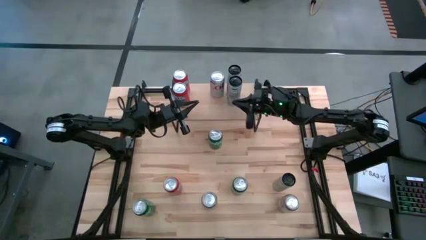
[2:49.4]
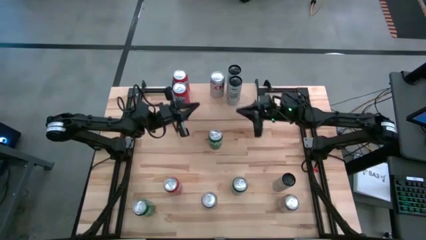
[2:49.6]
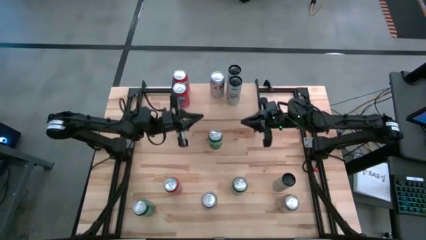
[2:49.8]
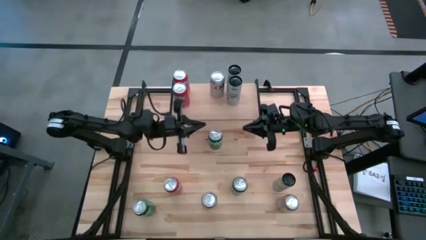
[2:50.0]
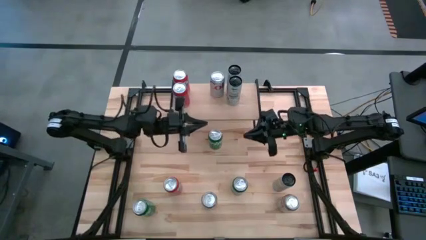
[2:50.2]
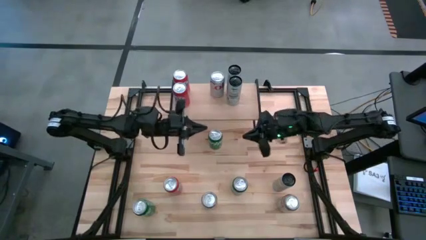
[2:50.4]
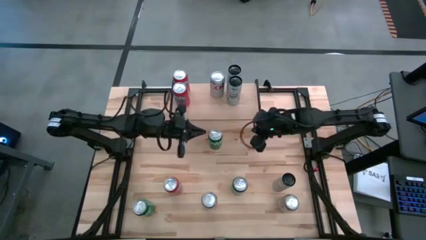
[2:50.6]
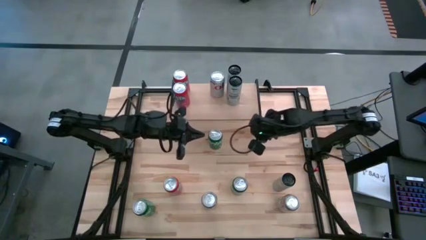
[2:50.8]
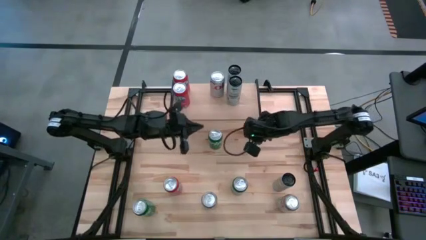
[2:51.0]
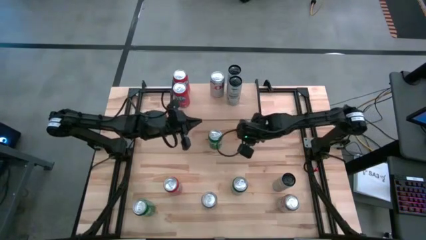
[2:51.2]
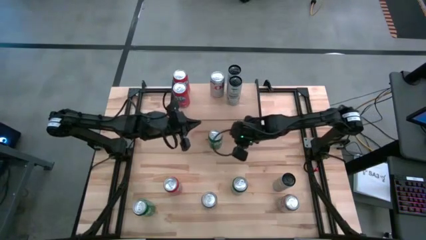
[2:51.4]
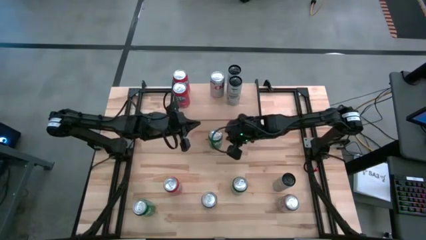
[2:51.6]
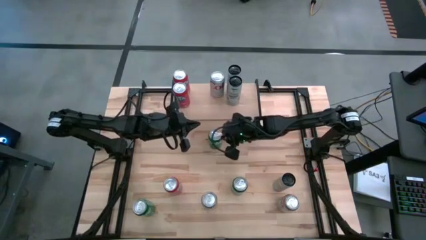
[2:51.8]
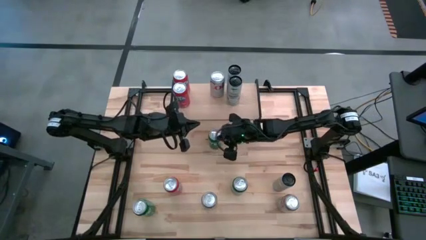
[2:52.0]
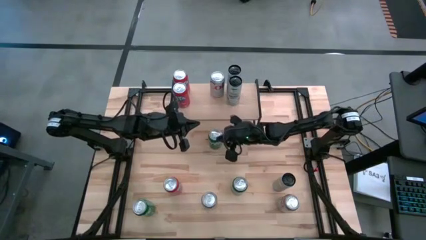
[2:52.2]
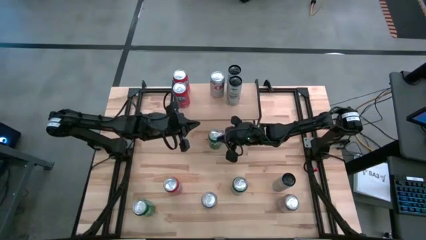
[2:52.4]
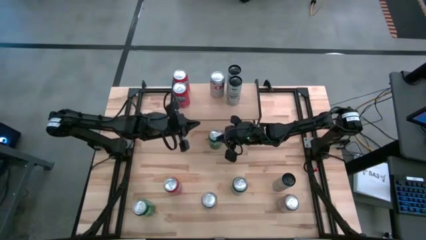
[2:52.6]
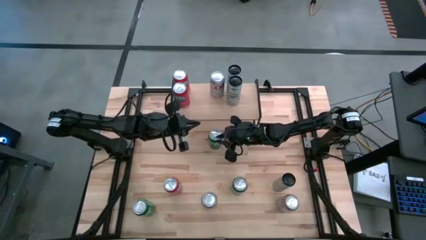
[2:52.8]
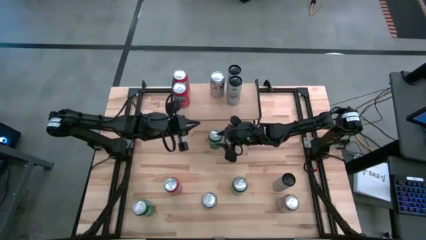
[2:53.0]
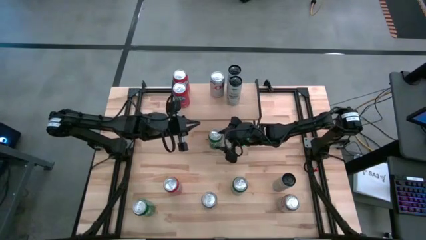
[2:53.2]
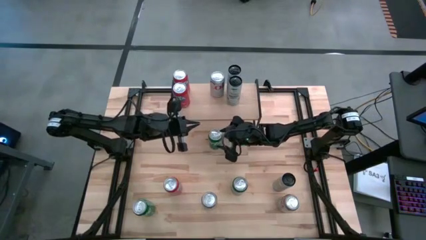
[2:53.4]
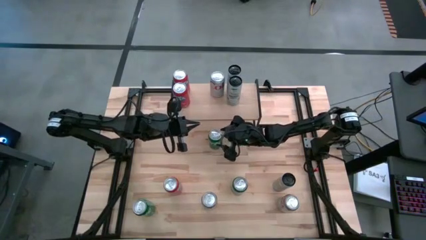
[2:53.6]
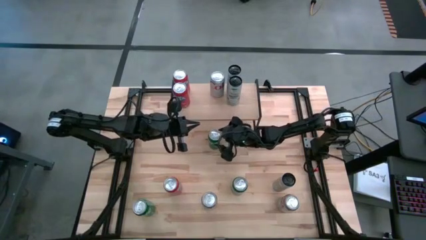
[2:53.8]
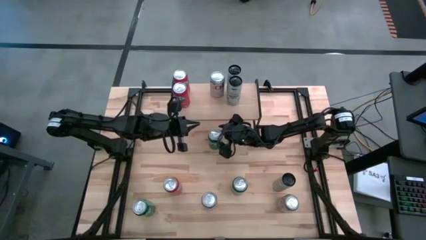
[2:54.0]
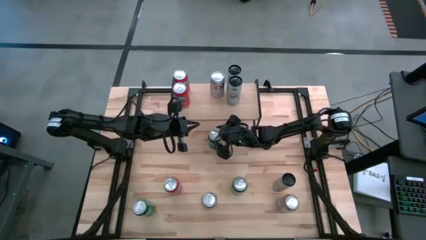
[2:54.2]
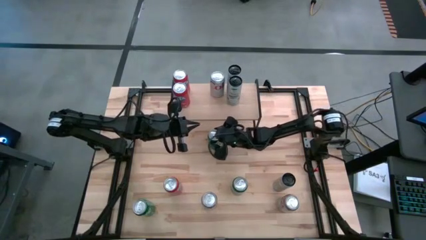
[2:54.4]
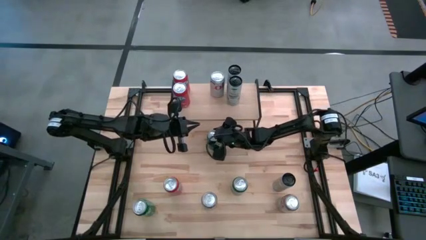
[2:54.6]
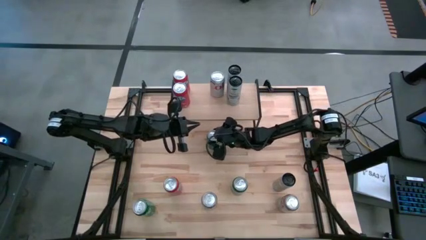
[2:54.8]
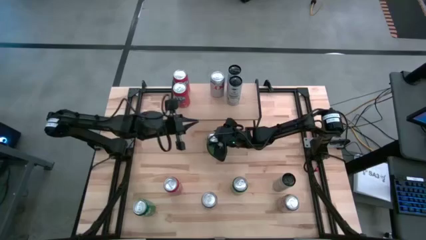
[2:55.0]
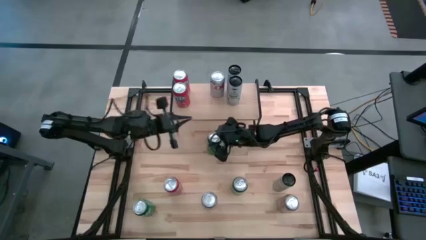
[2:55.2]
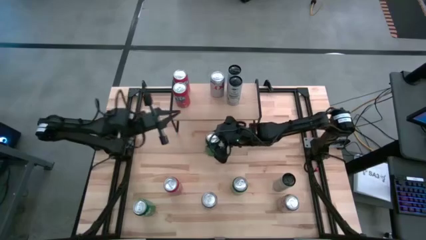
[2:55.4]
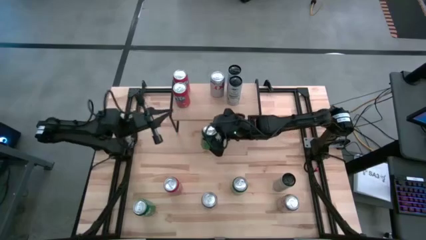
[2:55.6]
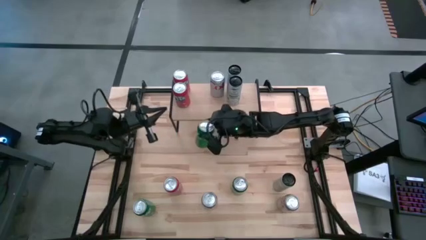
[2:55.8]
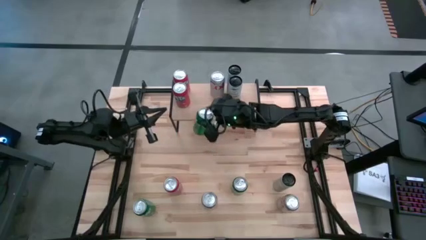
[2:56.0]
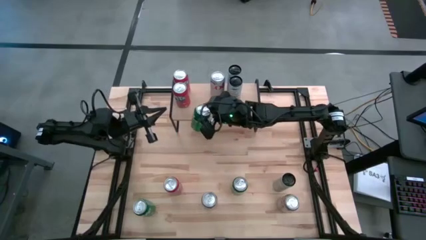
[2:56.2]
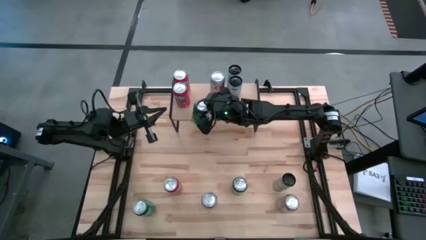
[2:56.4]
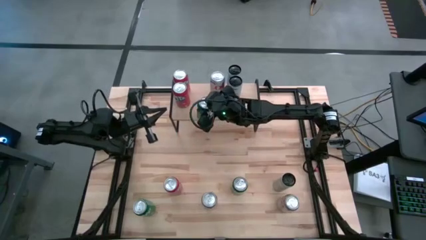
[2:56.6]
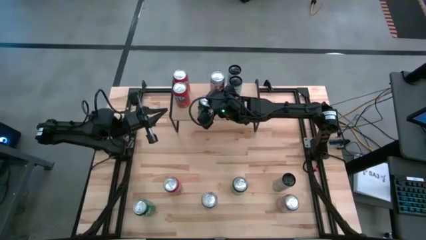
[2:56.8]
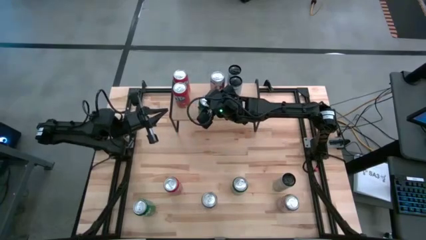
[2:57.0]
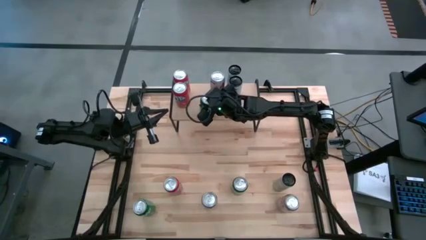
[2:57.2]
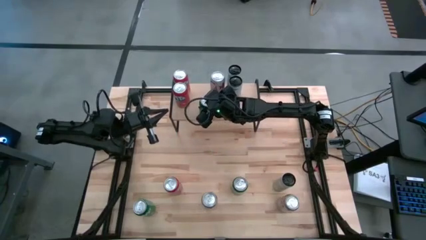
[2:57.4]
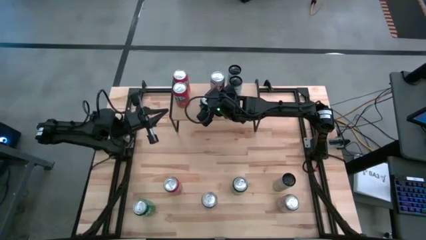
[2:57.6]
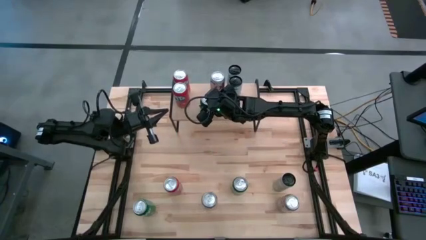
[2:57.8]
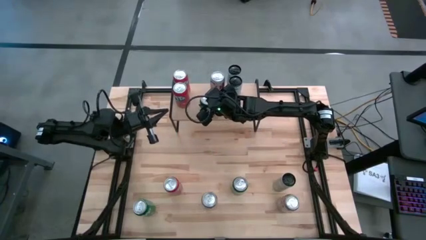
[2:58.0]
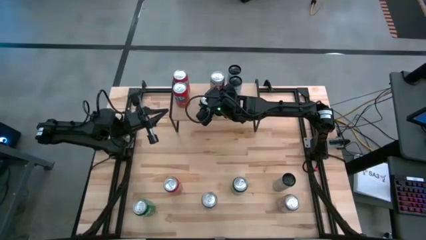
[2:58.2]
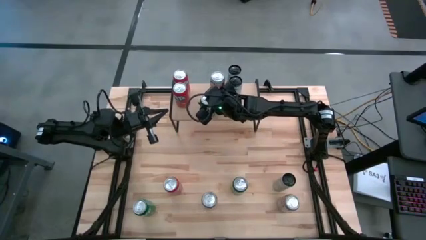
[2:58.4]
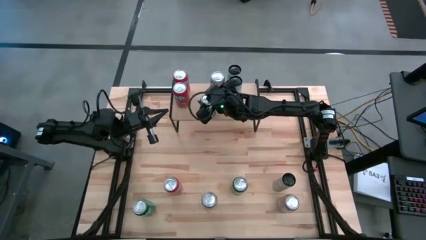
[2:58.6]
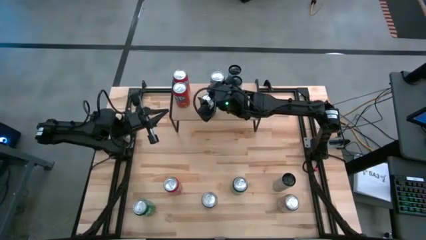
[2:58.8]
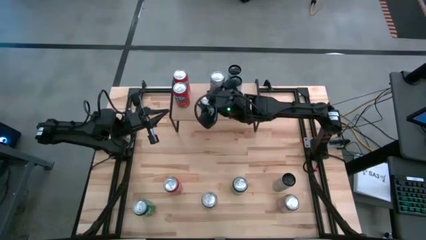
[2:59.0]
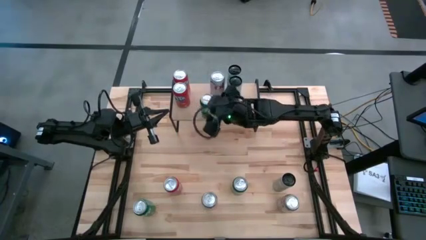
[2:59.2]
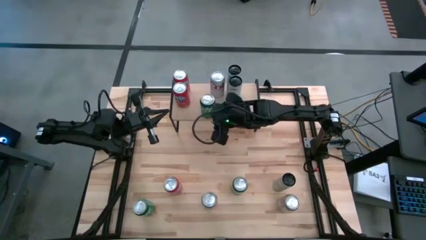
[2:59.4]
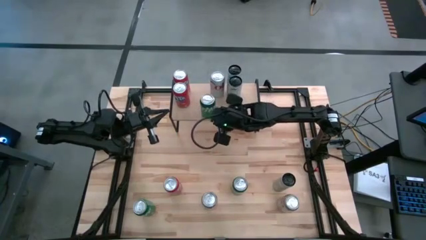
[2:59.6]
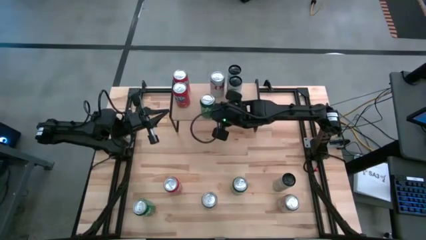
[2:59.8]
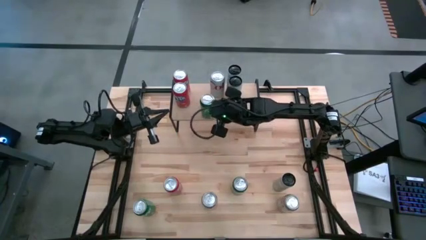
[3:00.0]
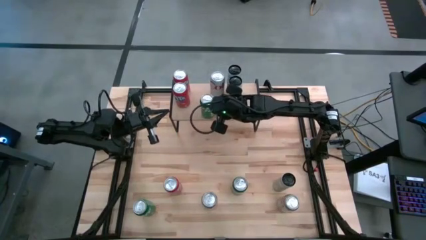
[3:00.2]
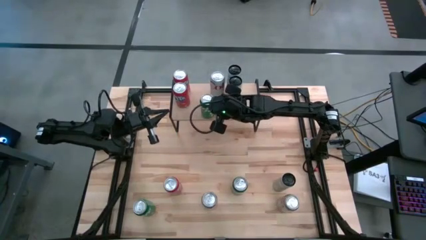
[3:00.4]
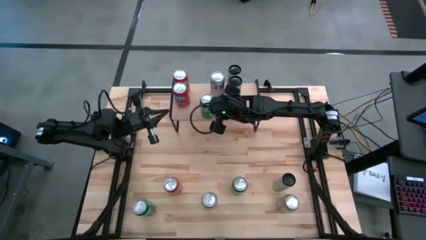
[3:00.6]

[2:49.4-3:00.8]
Task: Place canned beverage on shelf
Put the top green soda can on the shelf

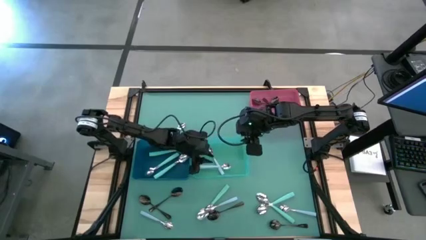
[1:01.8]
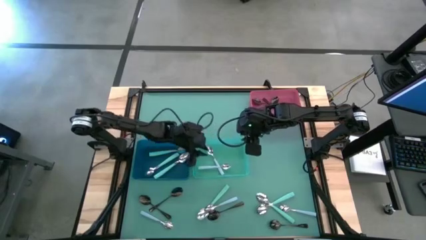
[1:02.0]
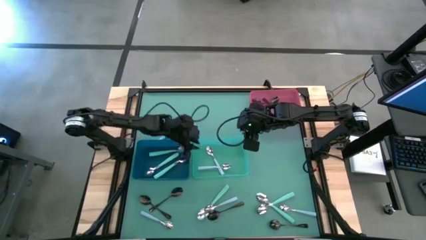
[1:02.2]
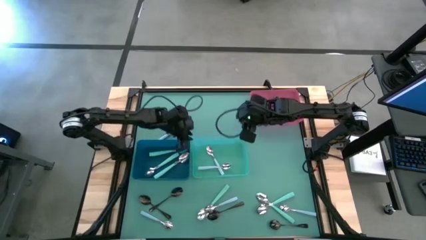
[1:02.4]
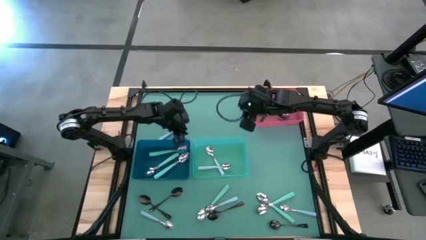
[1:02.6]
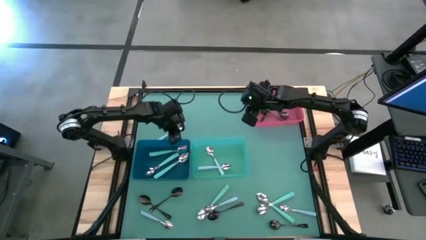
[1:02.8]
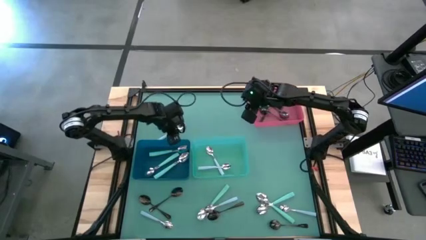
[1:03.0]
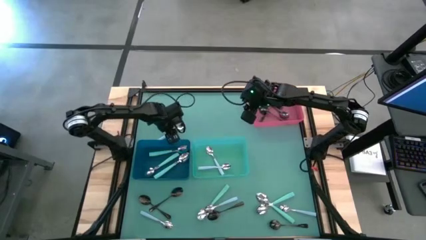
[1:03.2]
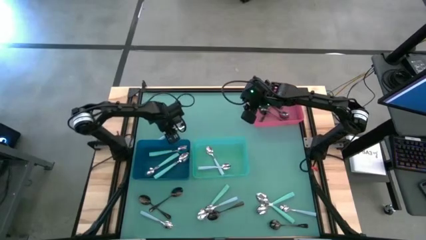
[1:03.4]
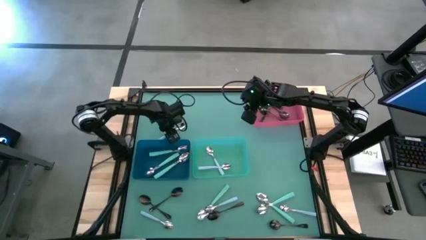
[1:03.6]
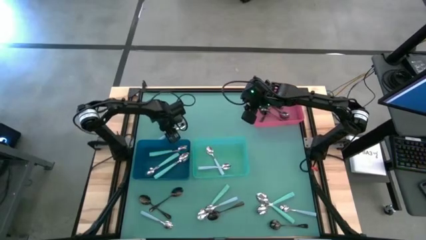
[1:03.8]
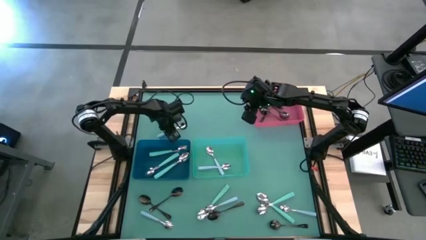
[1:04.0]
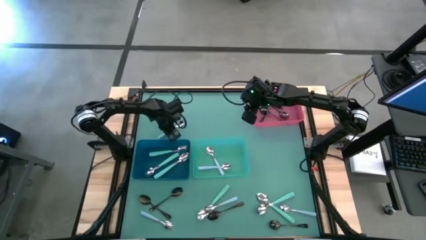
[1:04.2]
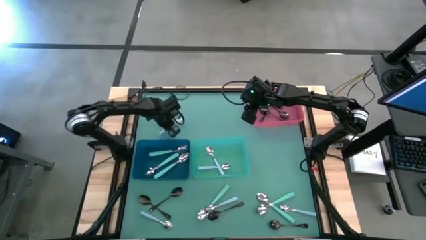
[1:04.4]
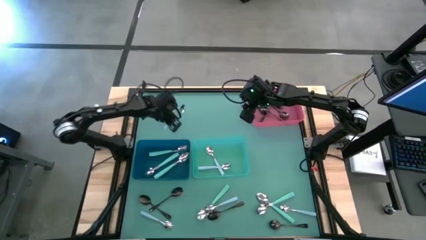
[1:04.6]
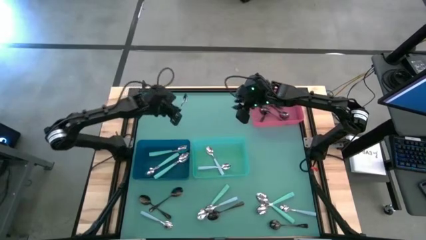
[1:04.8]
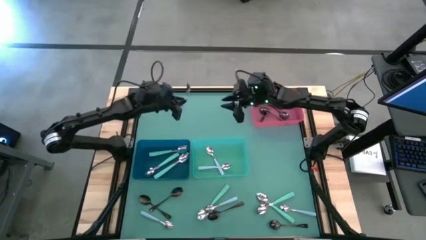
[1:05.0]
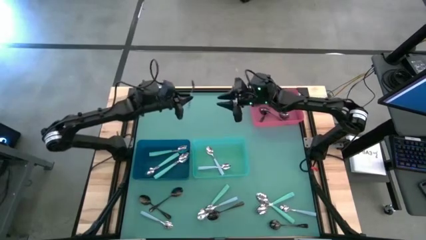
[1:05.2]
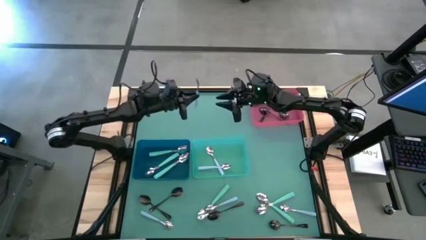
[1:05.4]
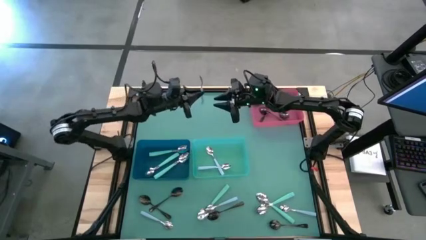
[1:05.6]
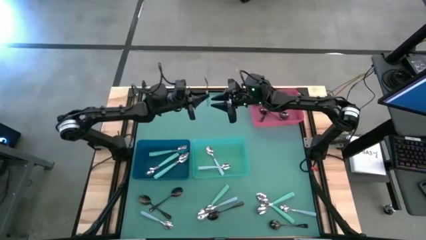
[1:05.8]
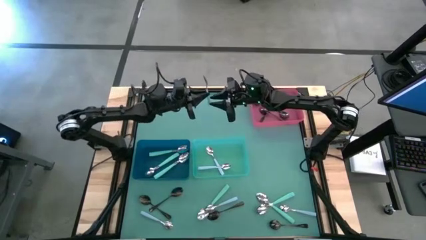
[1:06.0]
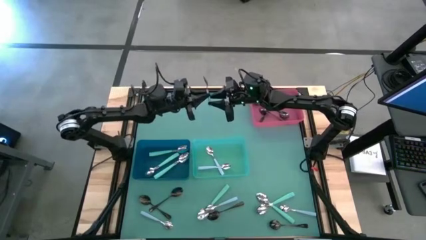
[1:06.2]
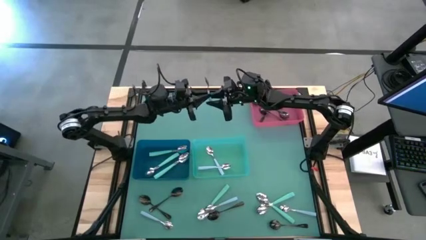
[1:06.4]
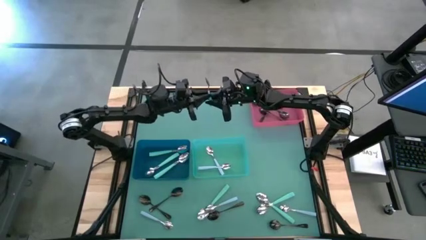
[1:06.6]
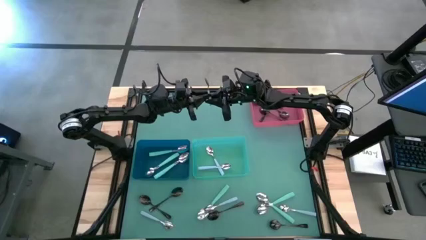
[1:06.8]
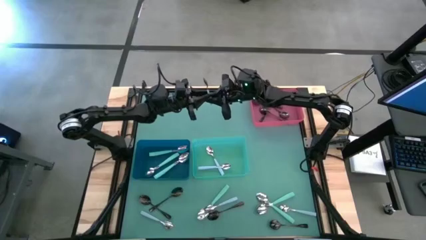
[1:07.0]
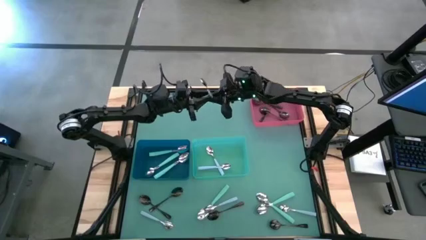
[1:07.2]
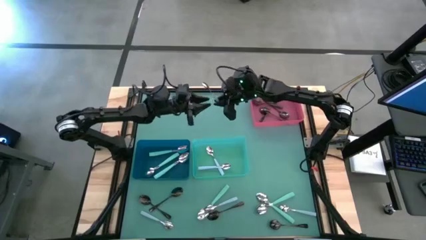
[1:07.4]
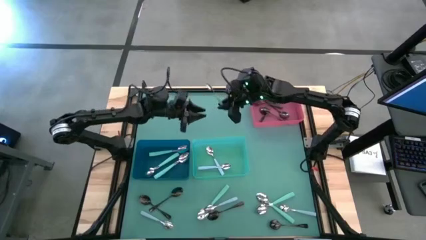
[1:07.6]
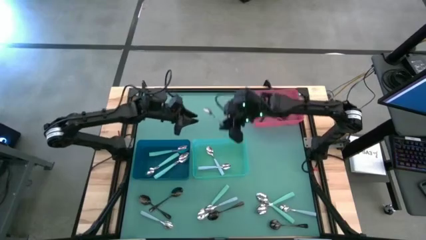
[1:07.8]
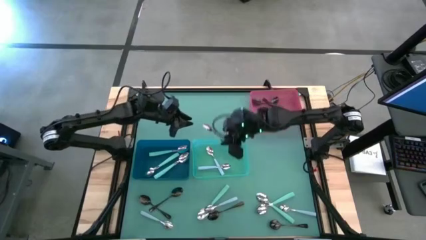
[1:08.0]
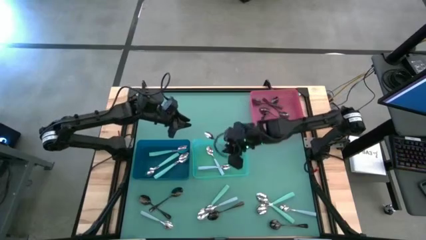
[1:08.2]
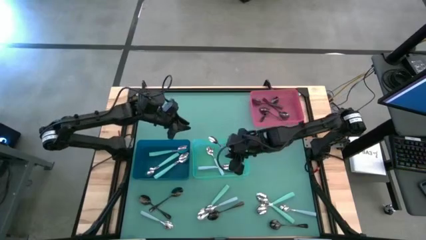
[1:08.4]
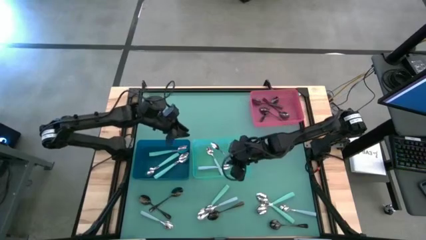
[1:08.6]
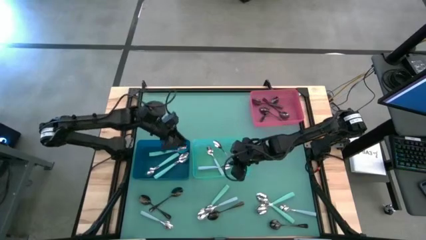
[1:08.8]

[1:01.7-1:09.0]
Task: Sort silverware by color (type)
Put the blue spoon into the green bin
